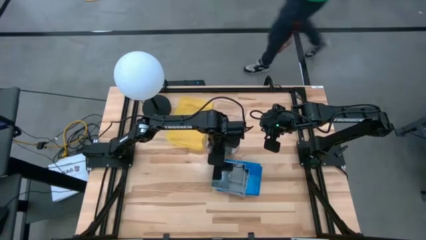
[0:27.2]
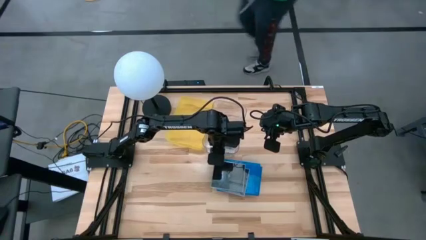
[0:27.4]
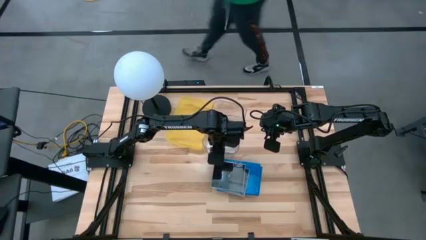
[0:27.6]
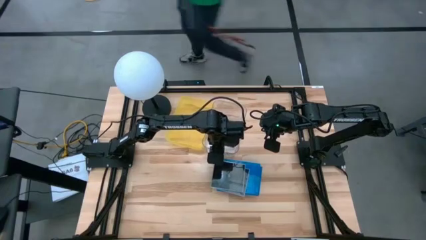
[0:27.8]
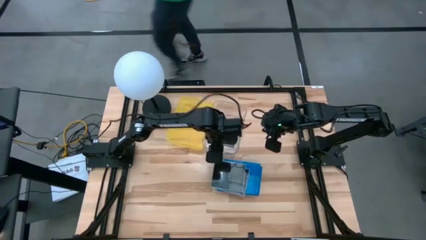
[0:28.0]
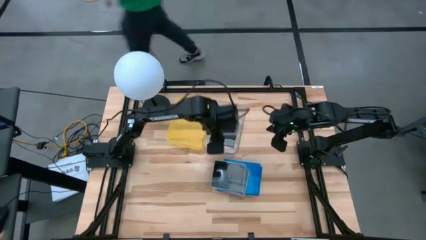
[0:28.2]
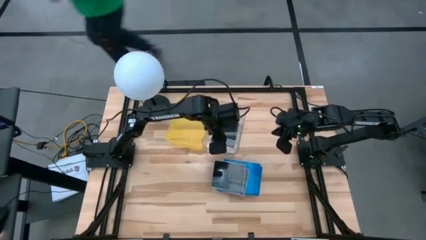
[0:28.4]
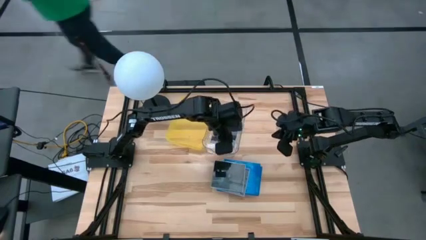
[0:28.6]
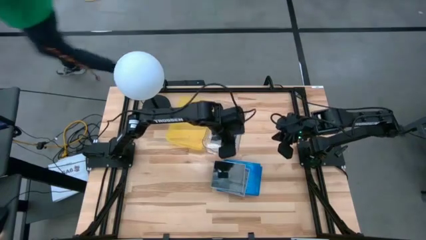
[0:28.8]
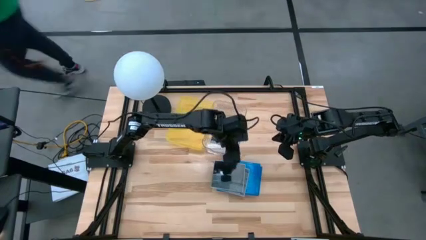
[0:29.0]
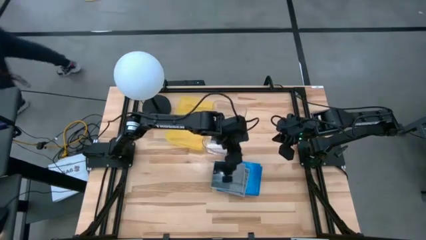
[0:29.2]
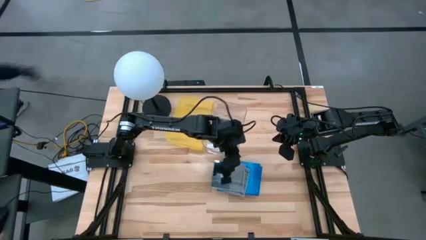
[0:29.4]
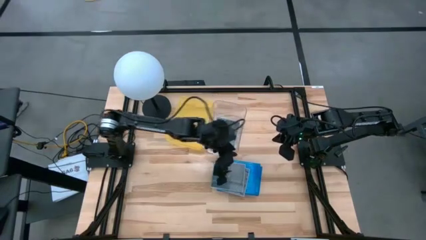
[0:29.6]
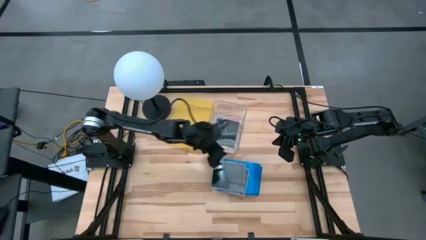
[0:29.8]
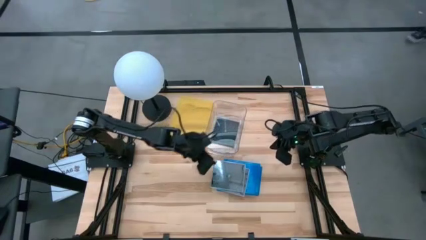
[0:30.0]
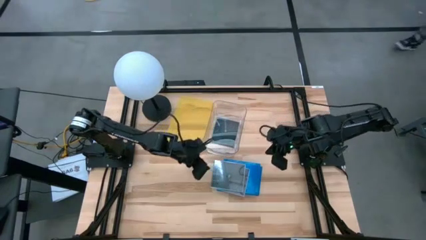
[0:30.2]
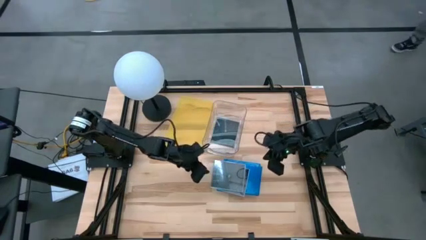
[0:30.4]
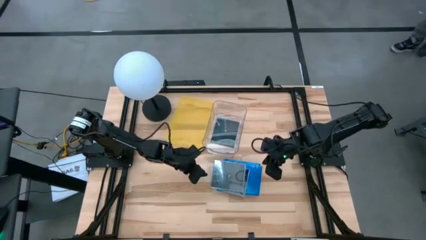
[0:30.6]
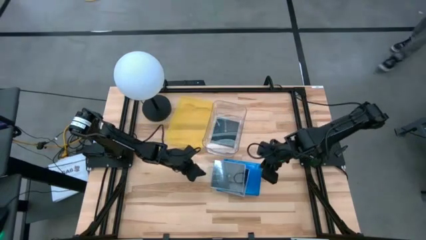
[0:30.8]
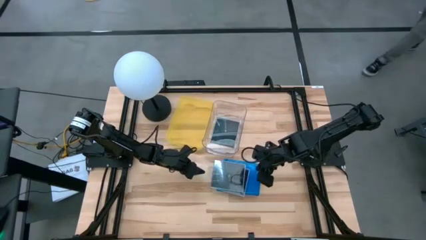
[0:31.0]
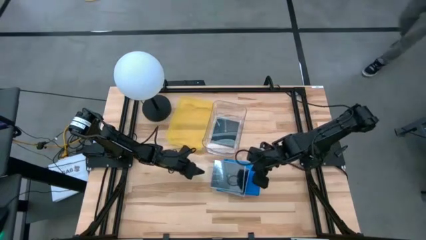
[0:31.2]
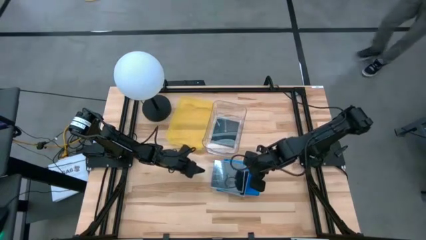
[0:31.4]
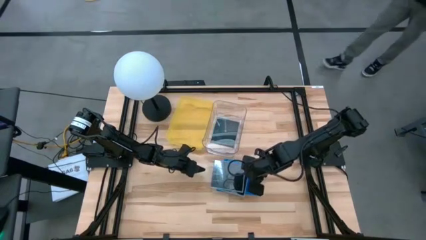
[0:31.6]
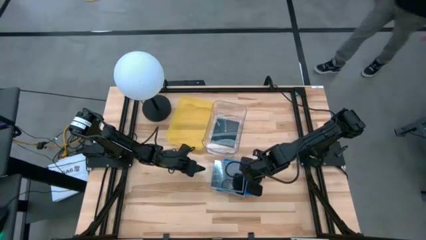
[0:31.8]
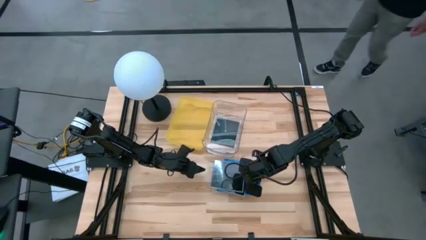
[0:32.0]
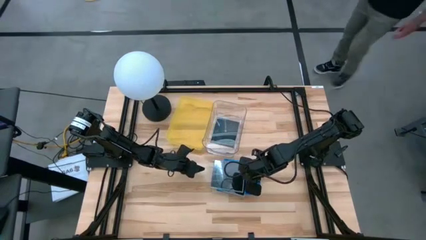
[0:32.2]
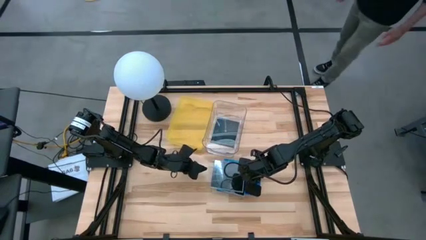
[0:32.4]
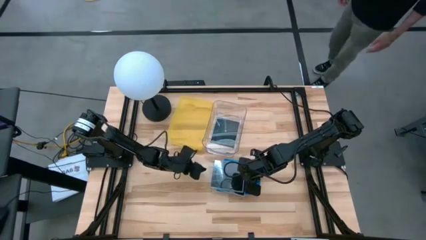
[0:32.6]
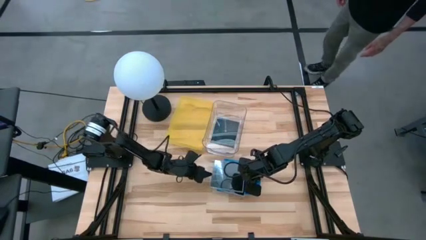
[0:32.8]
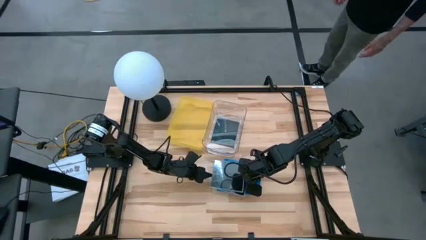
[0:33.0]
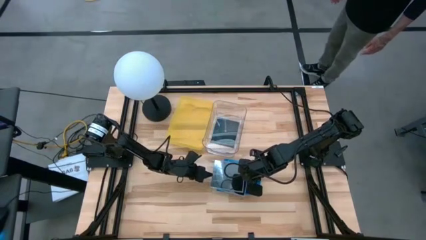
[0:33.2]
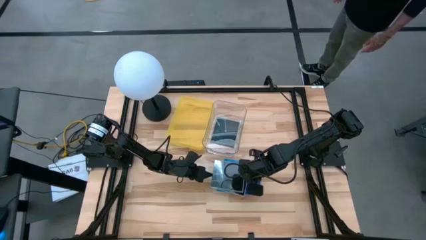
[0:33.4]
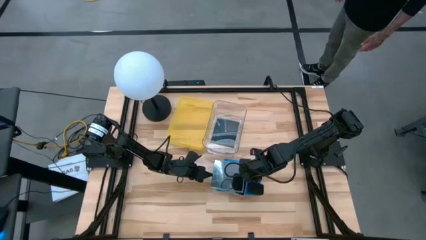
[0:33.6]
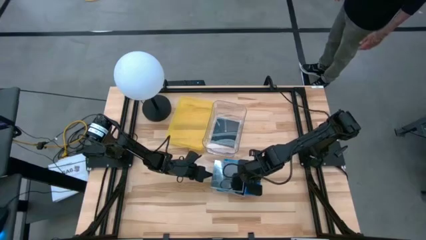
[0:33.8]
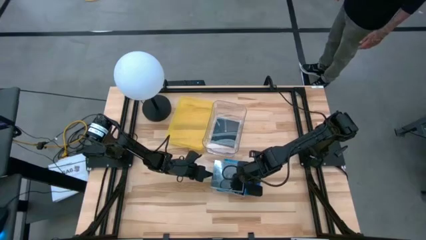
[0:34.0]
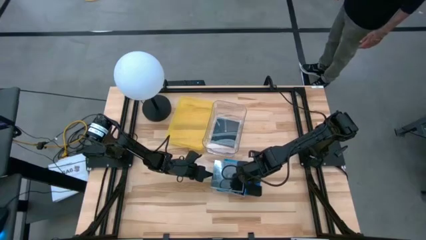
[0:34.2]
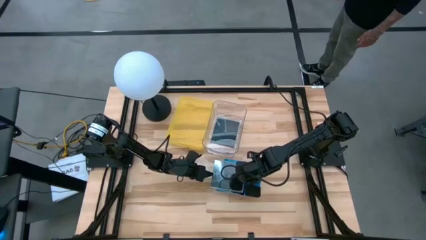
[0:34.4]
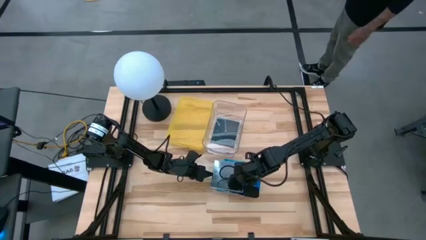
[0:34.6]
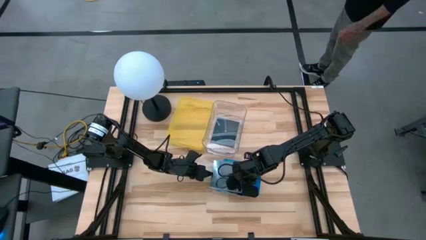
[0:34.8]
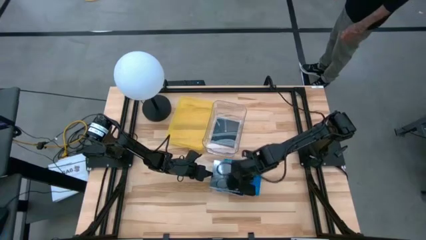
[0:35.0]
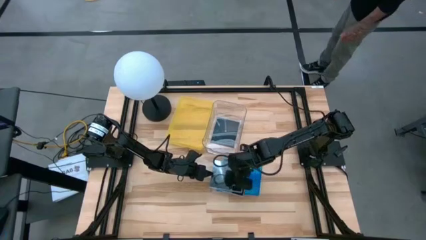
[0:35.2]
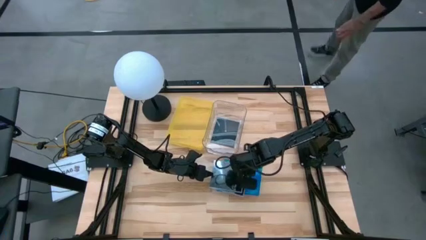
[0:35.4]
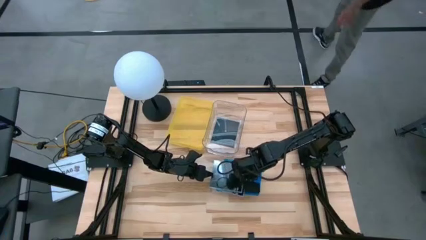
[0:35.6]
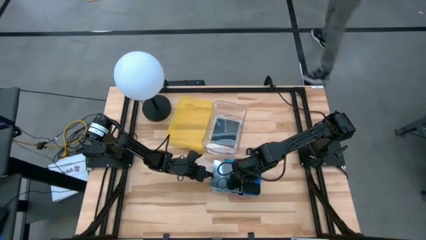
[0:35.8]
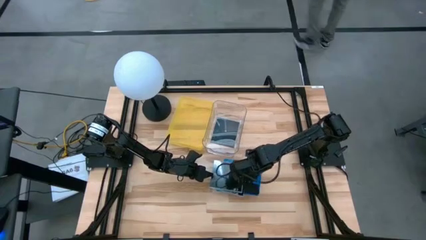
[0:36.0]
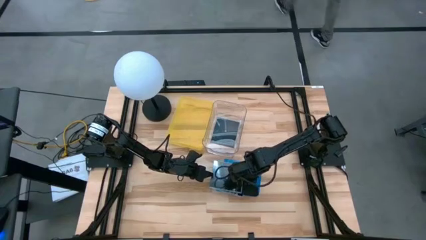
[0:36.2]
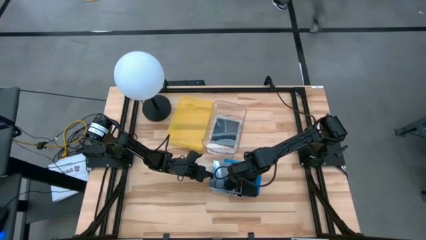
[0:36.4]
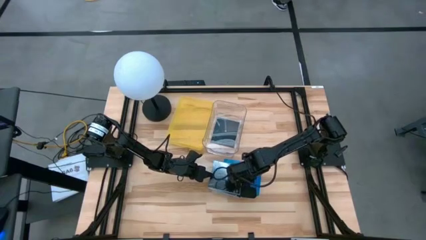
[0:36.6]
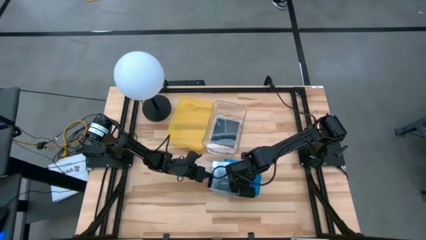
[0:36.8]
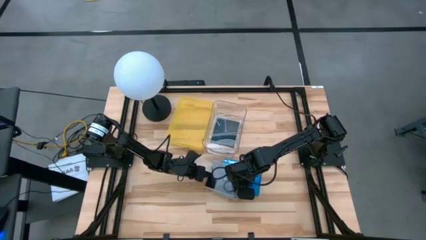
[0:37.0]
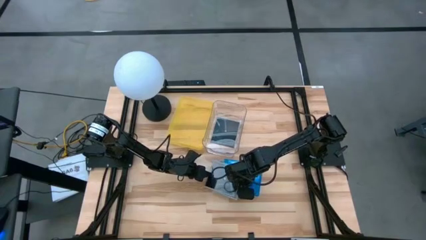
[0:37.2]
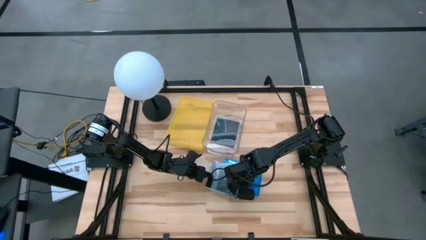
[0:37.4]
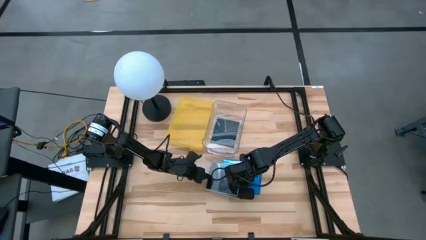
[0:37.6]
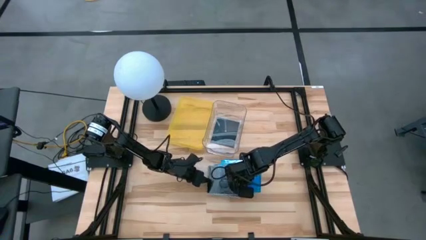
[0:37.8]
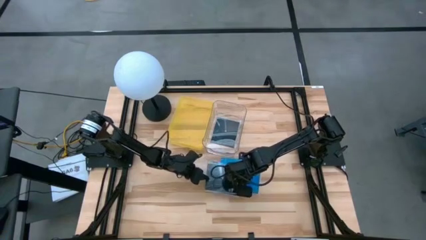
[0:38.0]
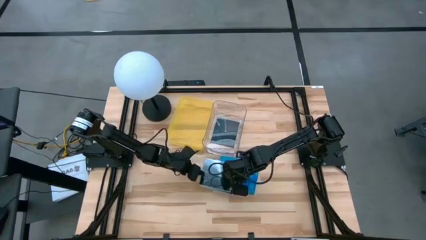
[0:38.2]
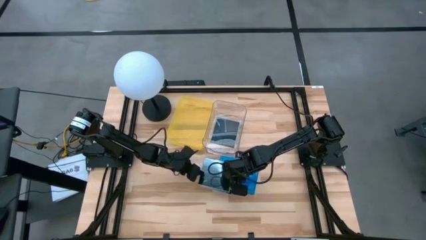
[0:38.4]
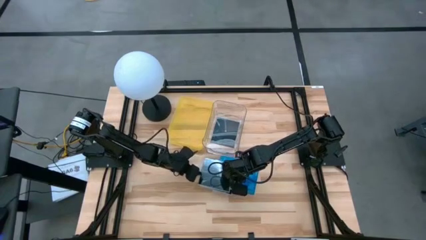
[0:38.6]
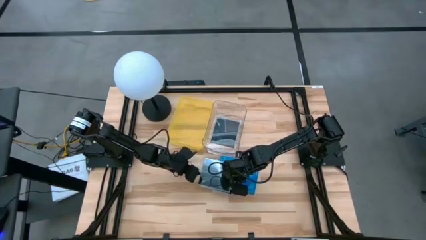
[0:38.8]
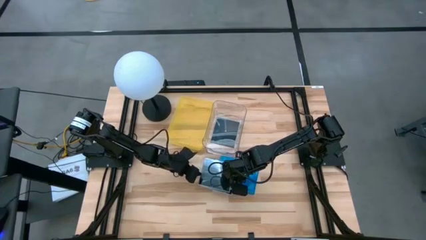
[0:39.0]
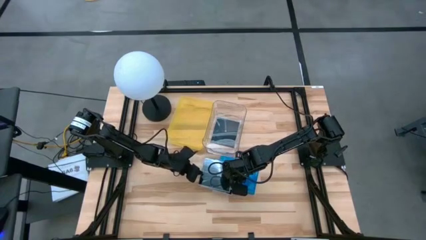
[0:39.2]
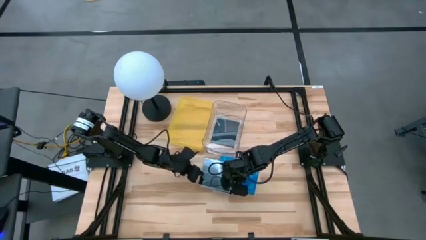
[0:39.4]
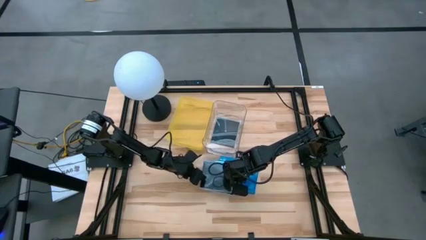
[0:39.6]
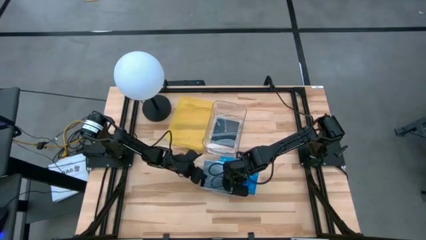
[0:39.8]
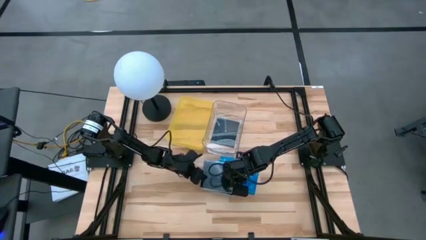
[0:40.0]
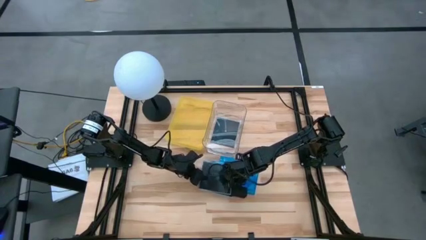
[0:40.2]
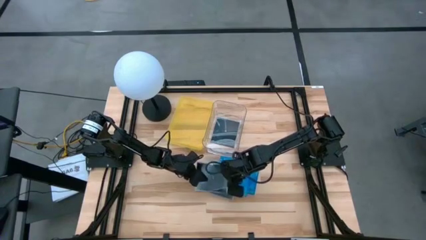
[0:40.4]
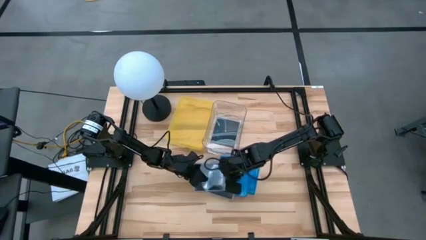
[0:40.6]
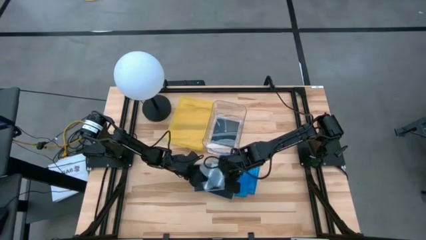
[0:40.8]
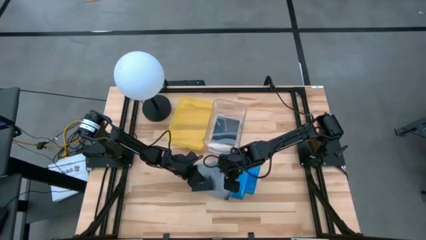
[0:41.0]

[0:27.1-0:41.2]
Task: Pick & place jewel cases by type
Put the black CD case into the transparent bin

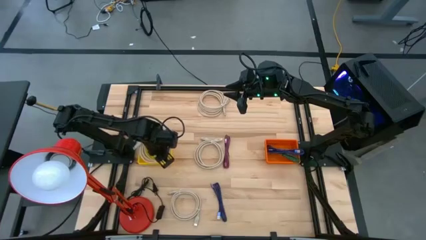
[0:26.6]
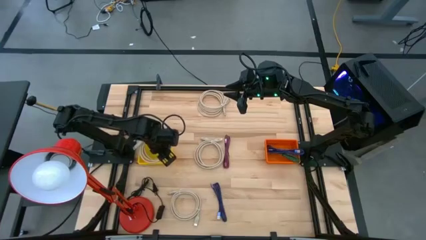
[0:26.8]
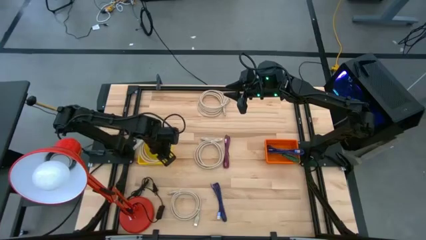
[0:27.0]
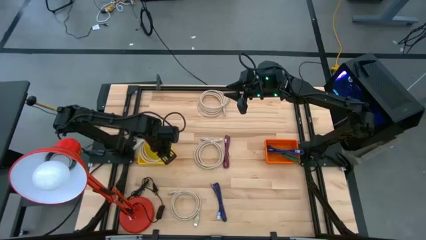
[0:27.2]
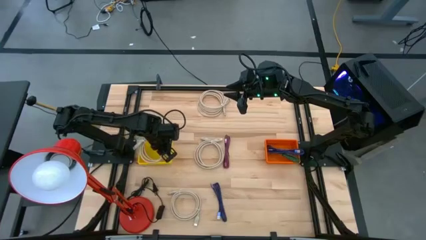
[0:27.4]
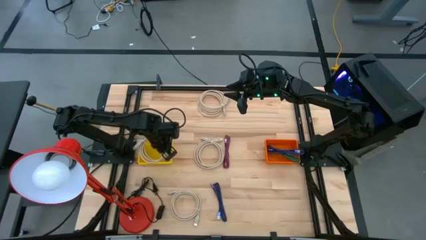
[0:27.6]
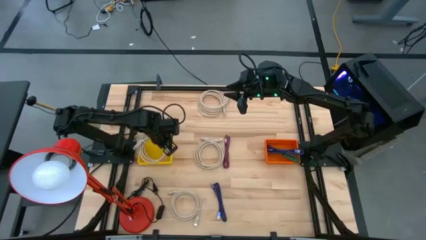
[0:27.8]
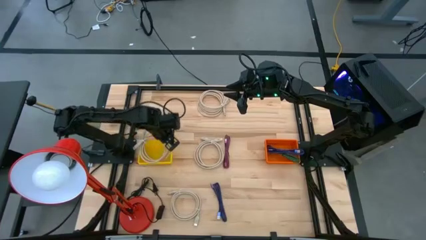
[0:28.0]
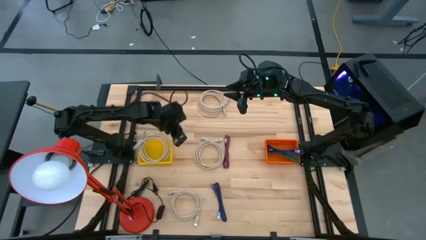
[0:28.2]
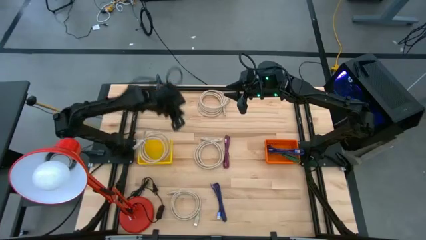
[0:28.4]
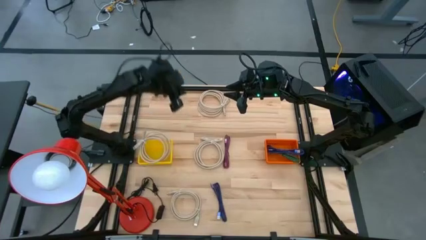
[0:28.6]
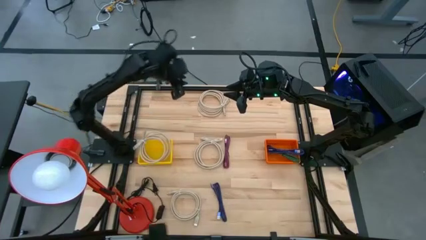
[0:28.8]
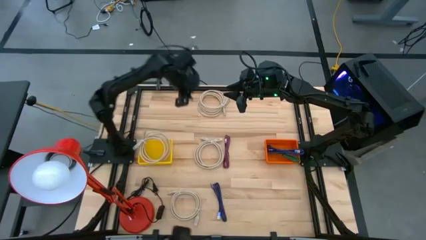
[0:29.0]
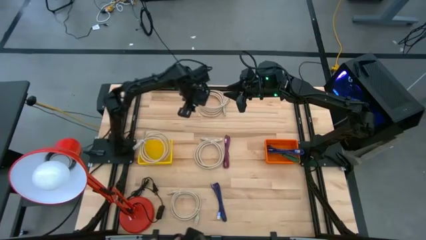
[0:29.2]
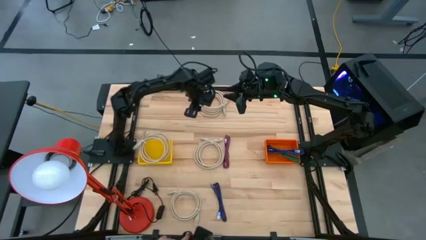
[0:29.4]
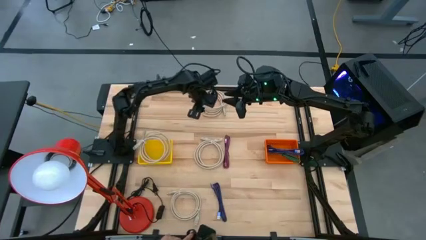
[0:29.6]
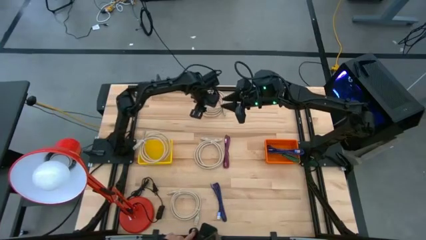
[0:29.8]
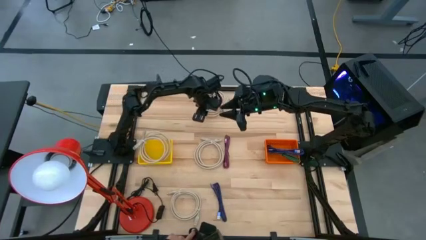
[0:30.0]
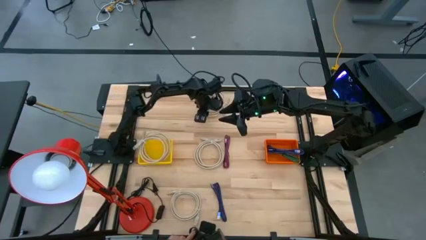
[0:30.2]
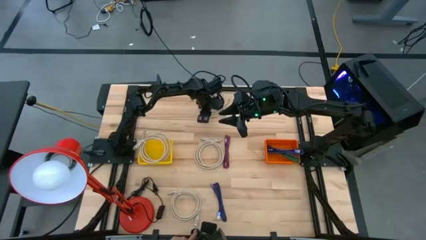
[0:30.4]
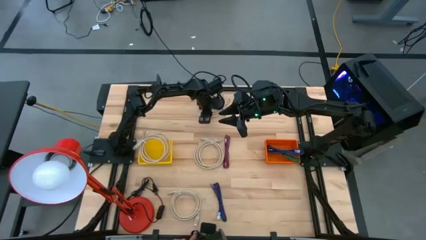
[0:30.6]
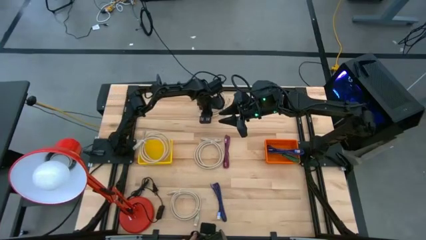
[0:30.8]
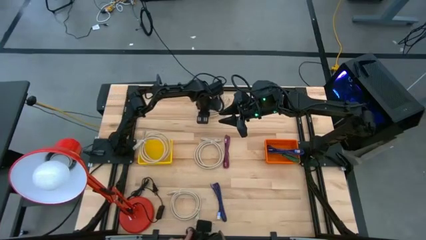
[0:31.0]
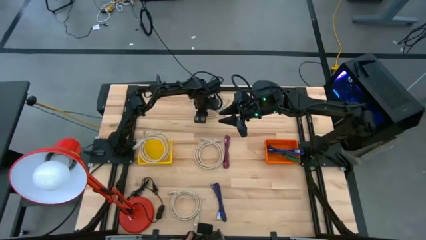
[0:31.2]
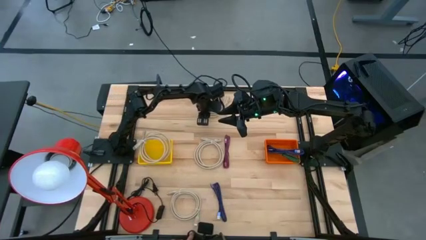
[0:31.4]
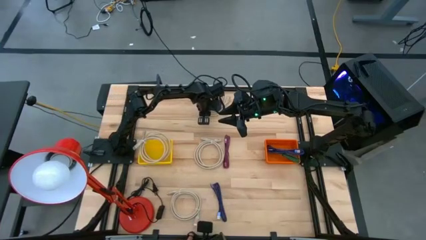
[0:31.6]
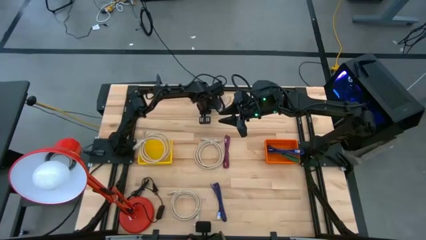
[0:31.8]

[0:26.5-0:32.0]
Task: Pick & Place USB Port
Put the light brown HDMI cable into the yellow bin
